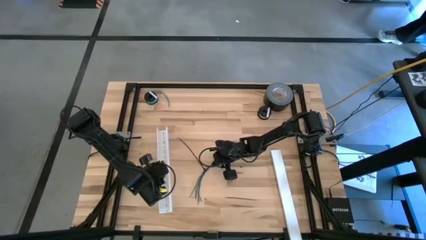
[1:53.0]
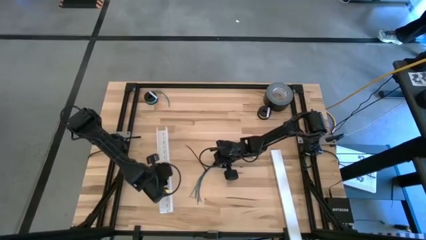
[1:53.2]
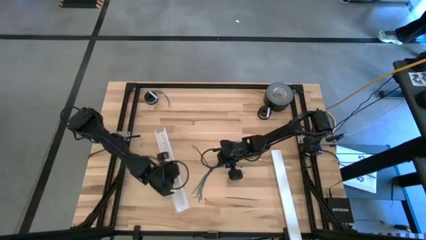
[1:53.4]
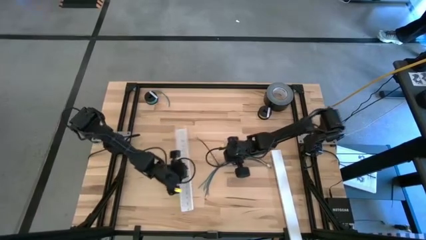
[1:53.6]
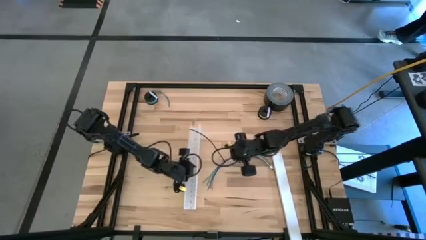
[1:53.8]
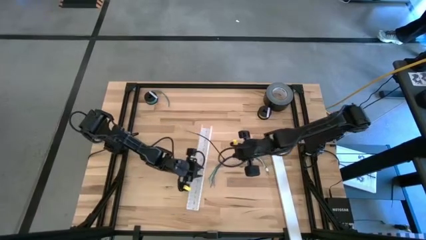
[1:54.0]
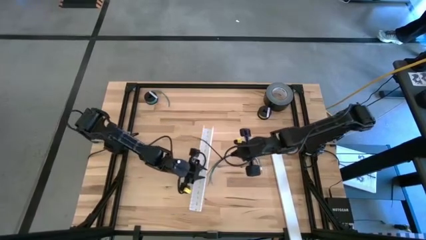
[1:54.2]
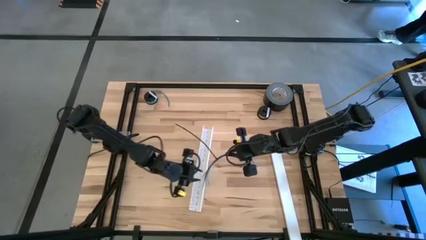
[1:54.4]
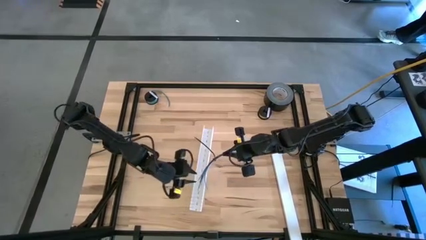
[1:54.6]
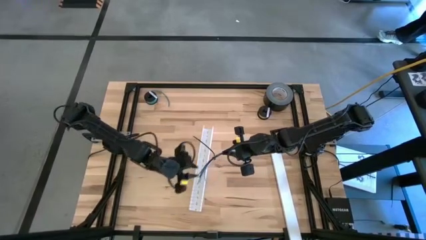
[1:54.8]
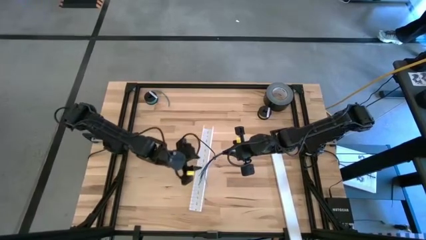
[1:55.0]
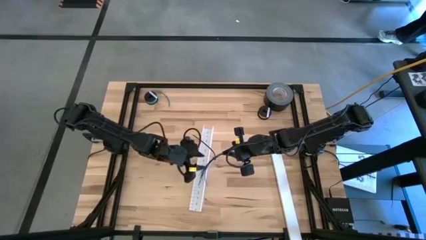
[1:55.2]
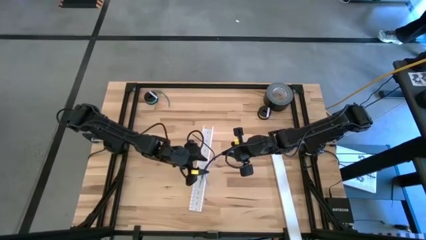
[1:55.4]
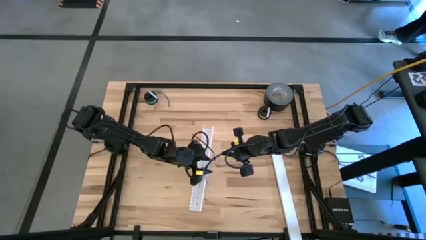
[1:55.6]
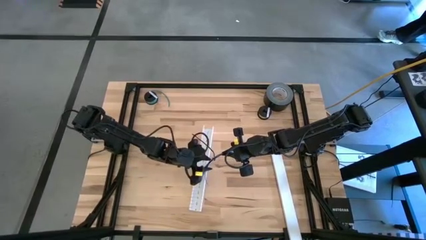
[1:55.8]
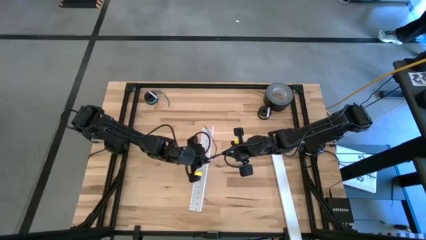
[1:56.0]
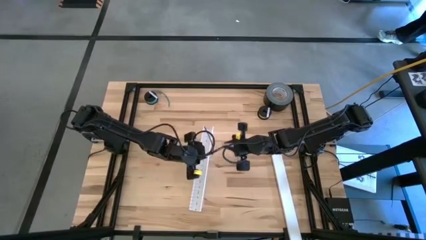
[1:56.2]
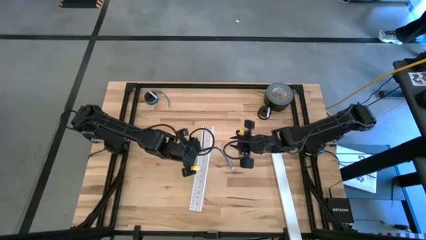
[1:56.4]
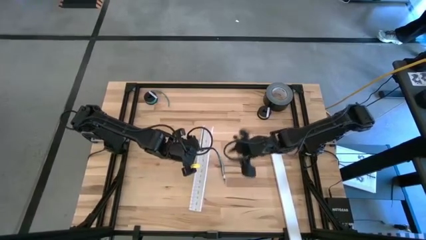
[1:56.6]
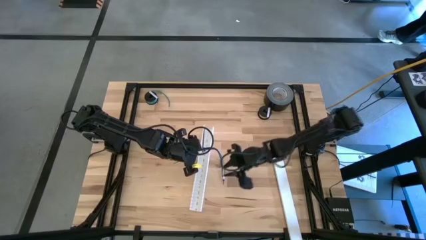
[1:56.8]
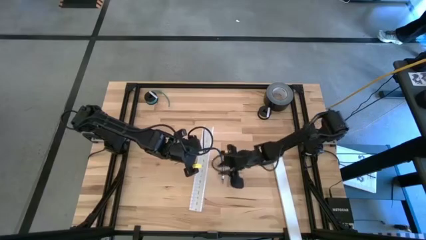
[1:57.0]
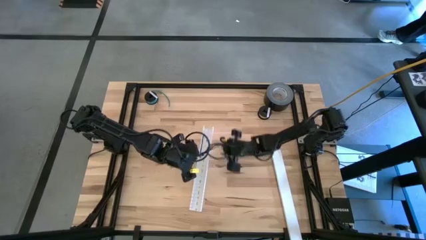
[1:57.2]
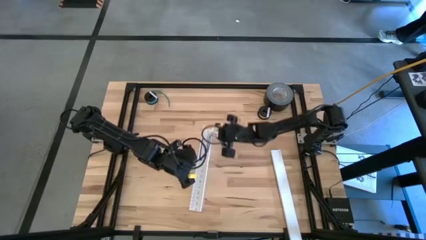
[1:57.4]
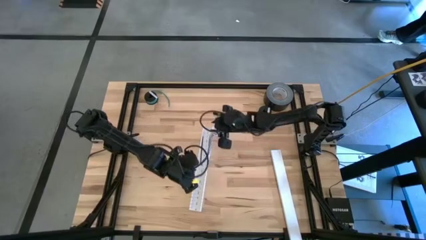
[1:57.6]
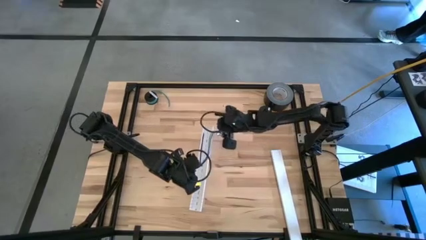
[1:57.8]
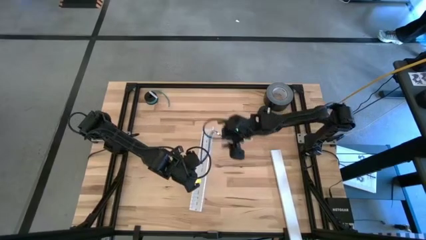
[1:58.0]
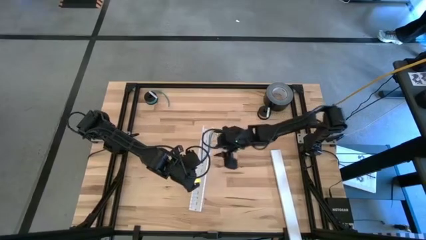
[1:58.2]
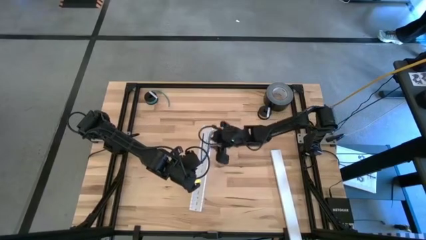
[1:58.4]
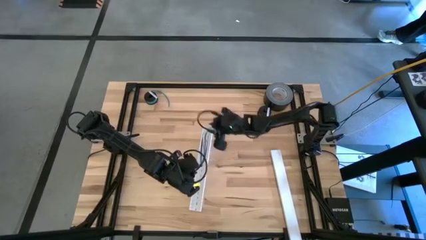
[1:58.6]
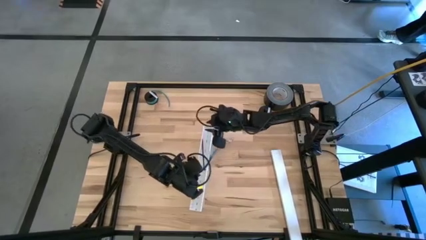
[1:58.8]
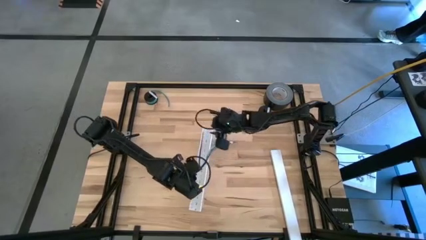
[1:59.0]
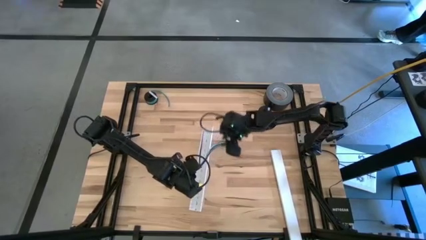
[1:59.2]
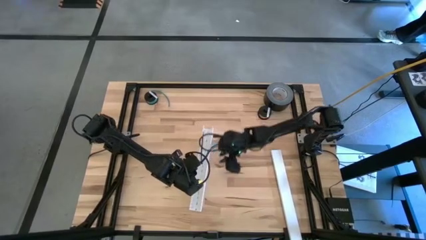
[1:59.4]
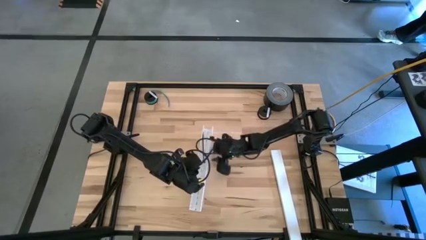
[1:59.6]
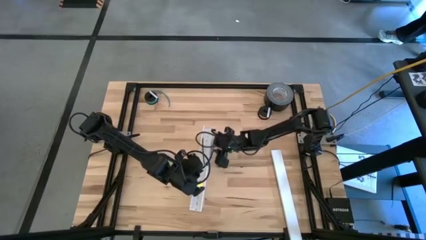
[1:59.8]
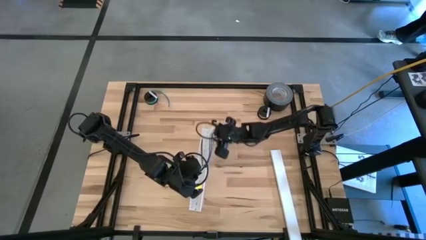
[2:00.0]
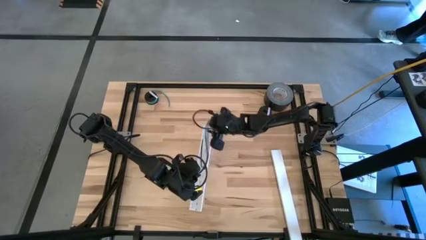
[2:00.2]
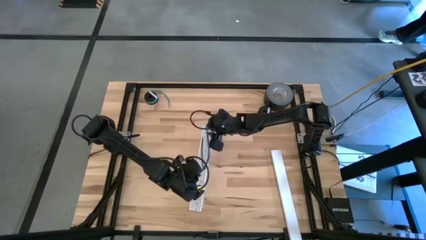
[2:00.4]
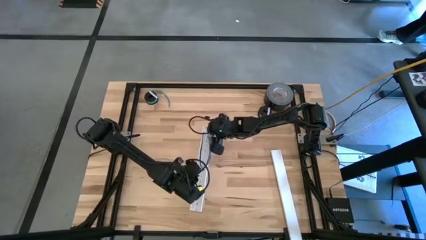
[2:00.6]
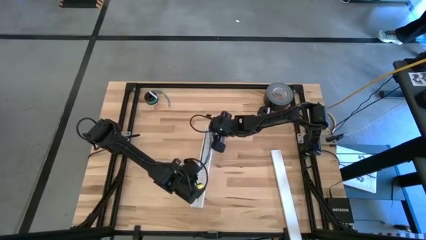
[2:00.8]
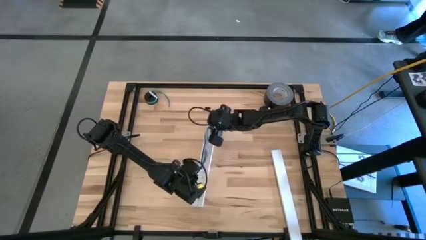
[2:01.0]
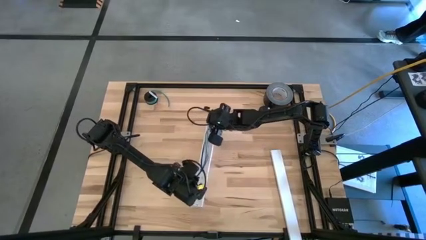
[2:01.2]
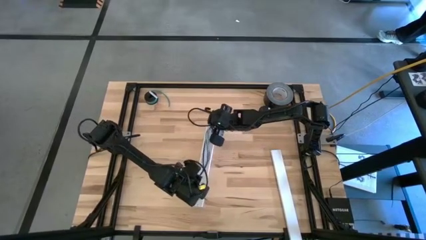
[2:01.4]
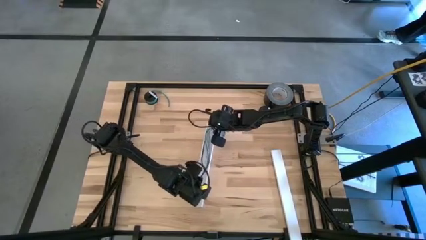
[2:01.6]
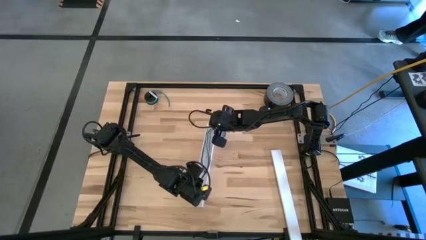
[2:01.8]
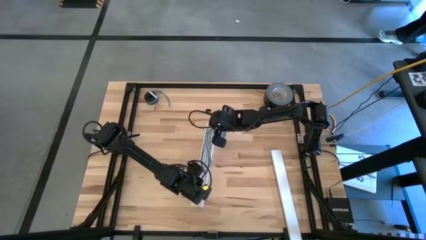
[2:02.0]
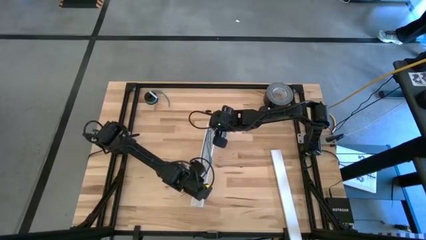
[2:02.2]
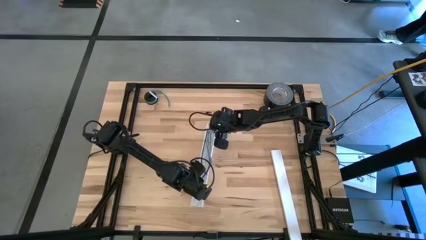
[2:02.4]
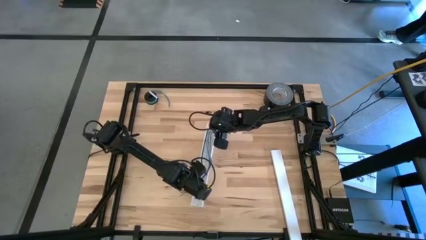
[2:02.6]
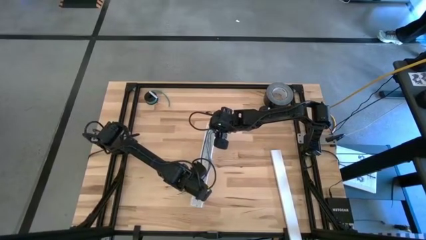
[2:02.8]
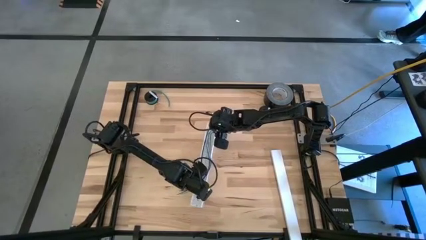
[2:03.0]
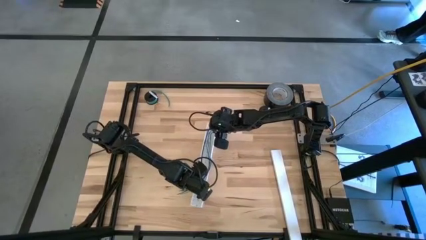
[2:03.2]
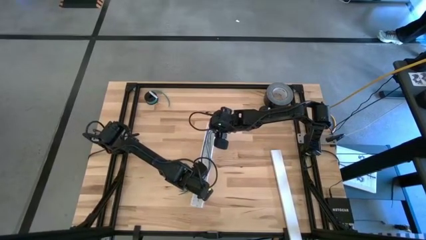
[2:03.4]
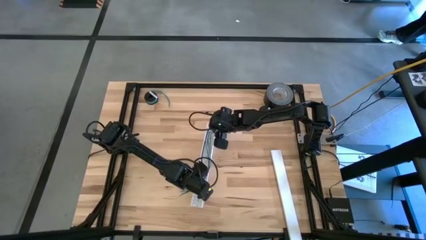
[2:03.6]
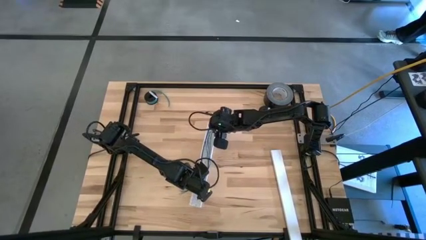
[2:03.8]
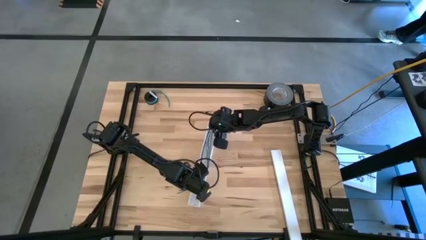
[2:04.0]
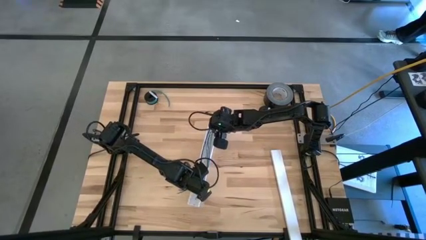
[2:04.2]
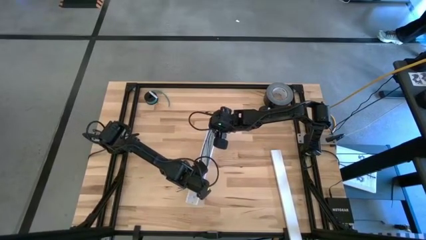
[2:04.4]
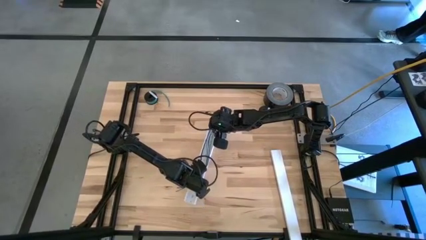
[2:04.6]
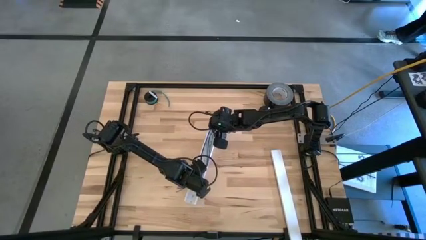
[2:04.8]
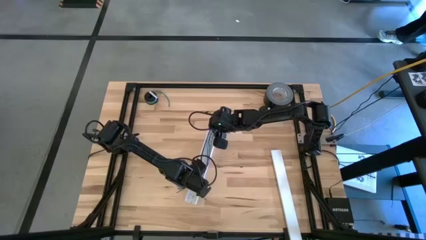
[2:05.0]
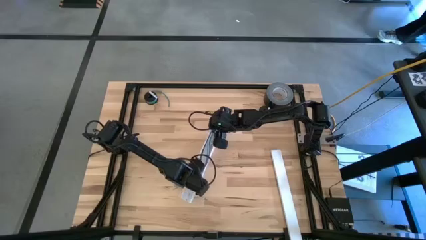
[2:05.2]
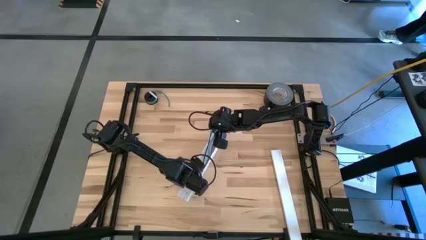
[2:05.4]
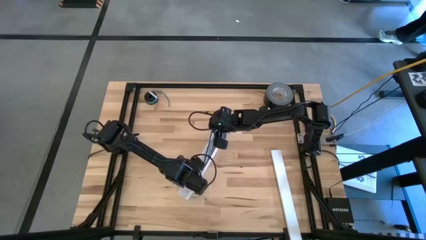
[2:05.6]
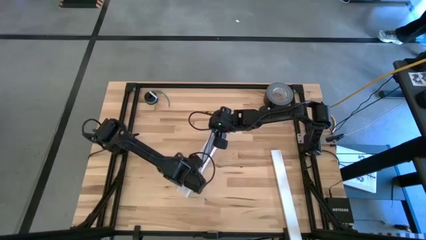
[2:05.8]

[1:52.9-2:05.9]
Task: Ziptie cables
Put the colored ziptied cable into the white cable duct

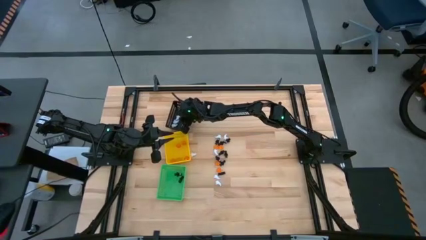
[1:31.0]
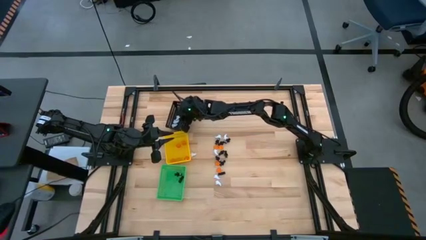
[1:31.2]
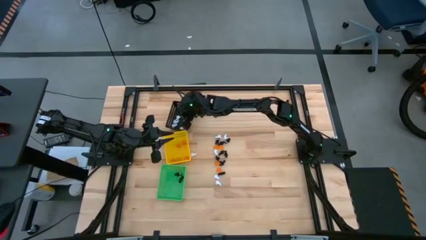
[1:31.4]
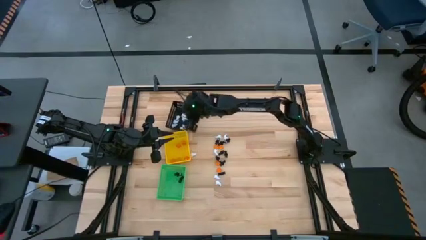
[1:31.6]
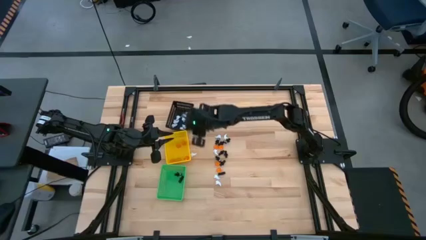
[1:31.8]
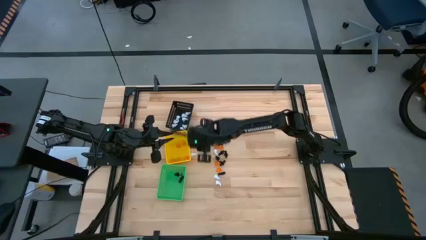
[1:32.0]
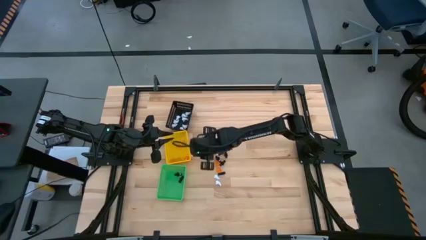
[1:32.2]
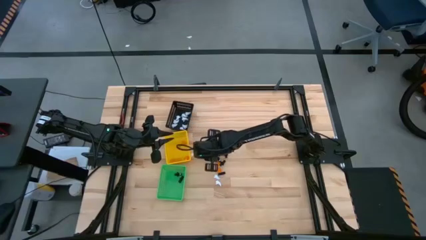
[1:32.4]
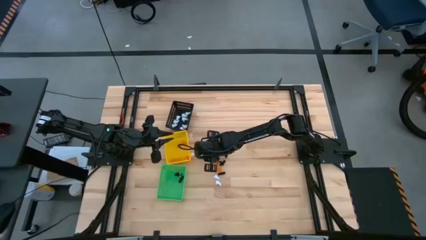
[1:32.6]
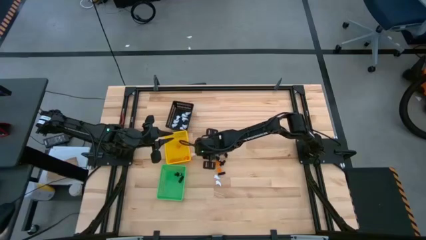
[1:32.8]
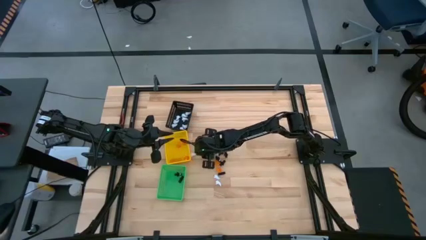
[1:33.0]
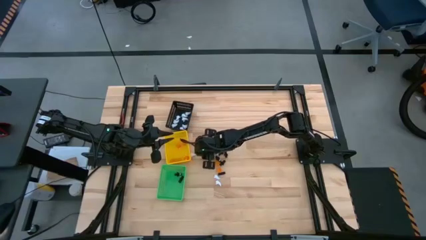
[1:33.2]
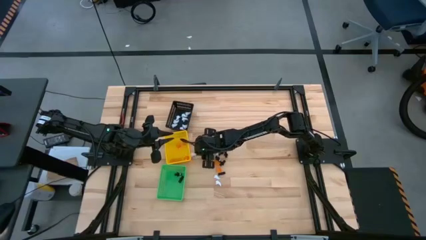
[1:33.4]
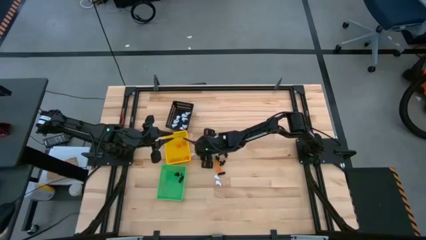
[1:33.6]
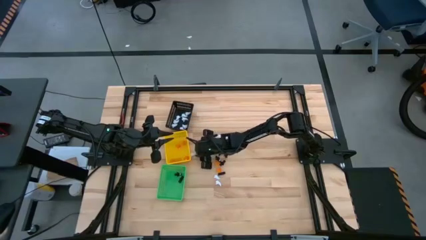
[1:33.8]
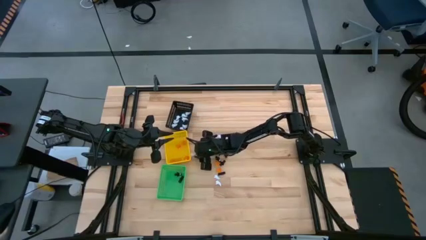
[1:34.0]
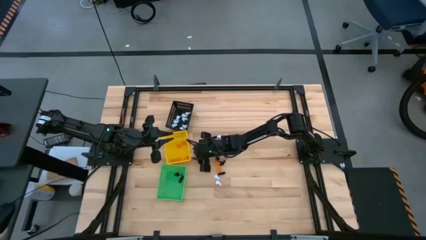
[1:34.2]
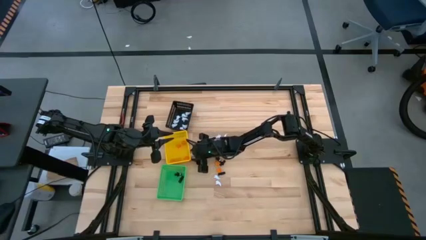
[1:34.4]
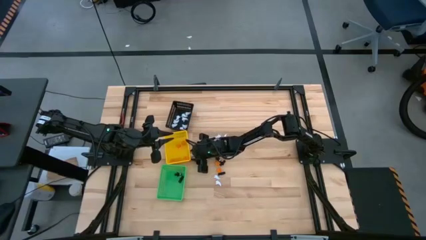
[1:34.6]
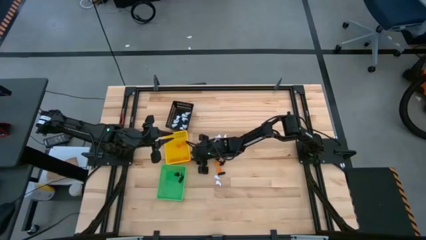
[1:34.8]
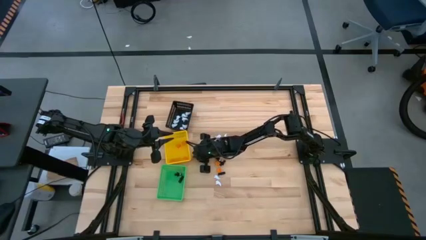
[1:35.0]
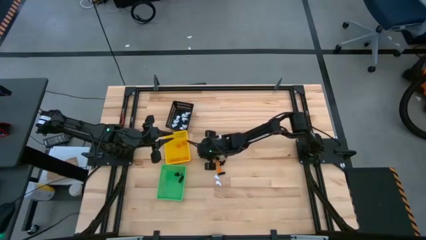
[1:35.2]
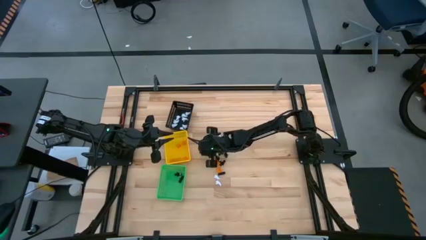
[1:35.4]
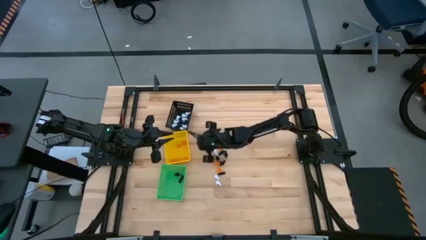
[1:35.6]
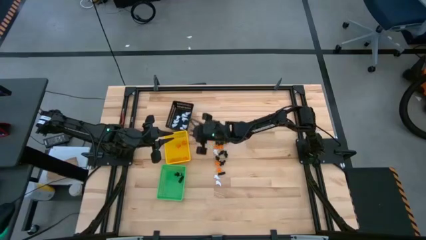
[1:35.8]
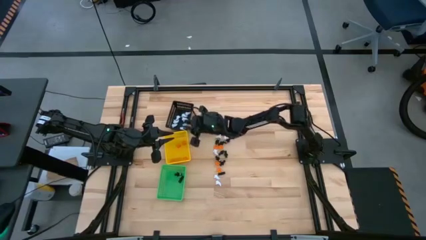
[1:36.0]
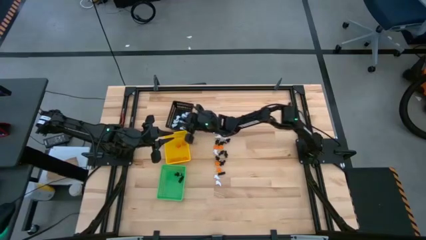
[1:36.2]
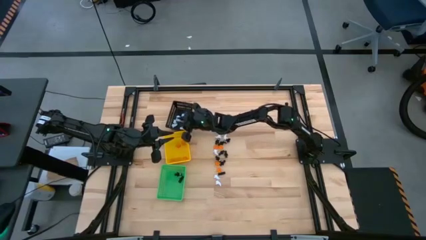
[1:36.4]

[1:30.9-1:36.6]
Task: Sort Halloween decoration
Put the white ghost plush toy into the black basket
